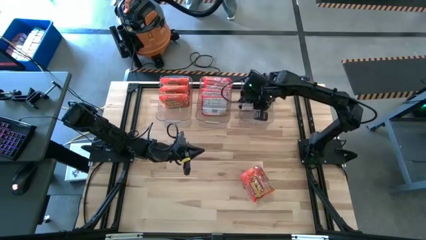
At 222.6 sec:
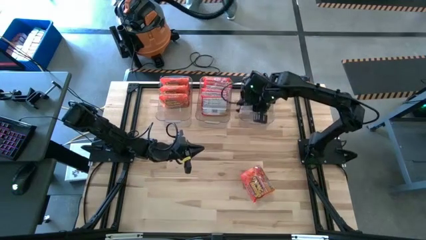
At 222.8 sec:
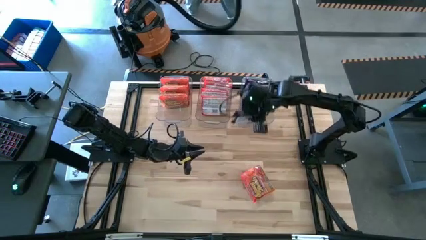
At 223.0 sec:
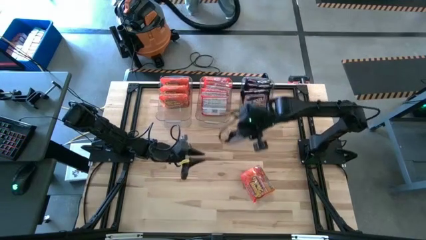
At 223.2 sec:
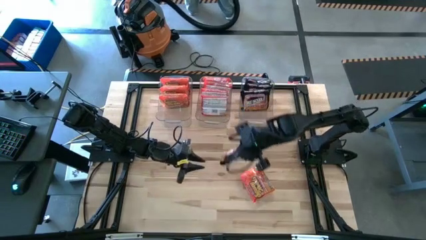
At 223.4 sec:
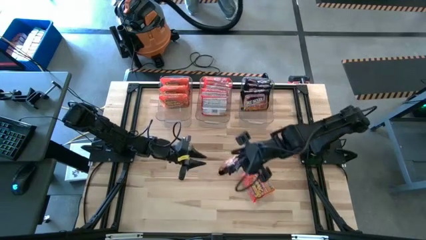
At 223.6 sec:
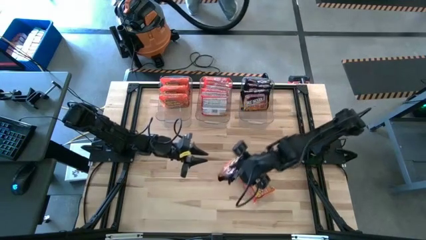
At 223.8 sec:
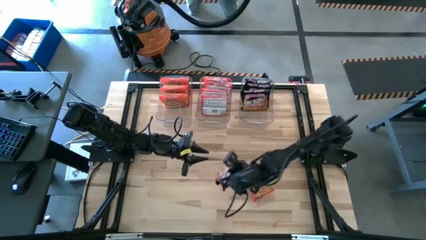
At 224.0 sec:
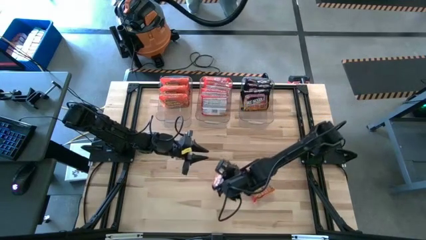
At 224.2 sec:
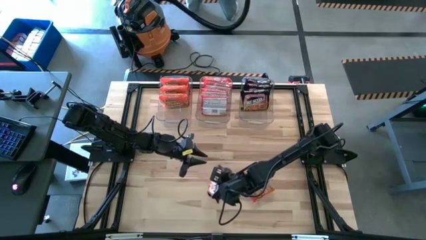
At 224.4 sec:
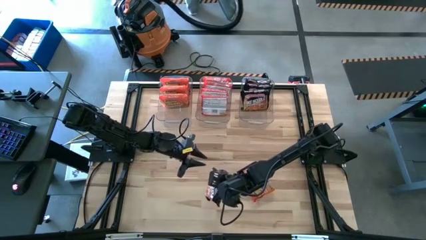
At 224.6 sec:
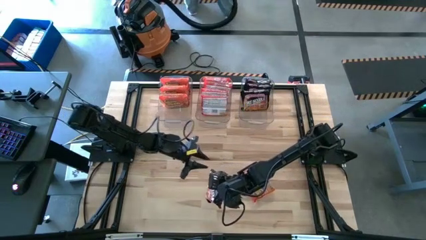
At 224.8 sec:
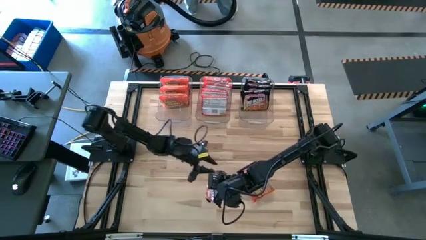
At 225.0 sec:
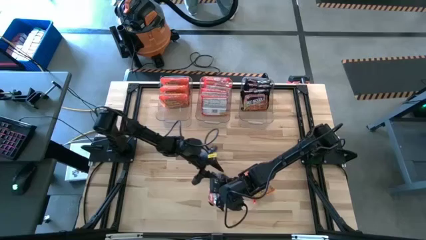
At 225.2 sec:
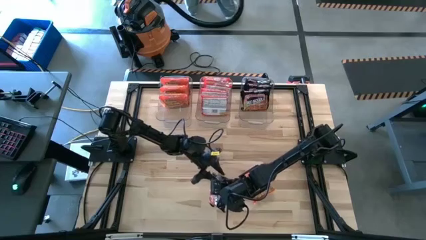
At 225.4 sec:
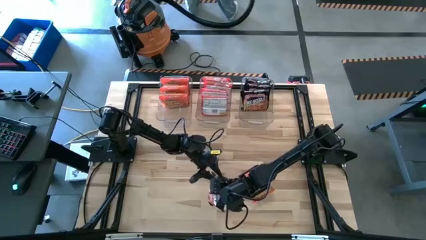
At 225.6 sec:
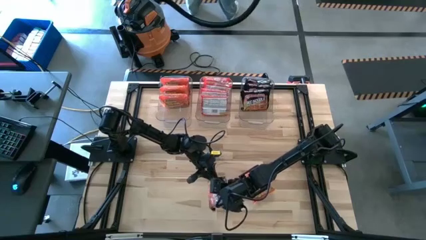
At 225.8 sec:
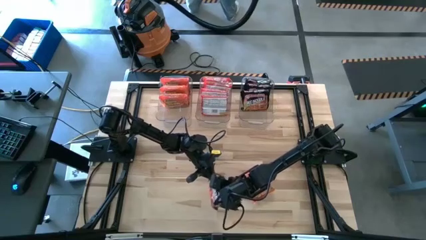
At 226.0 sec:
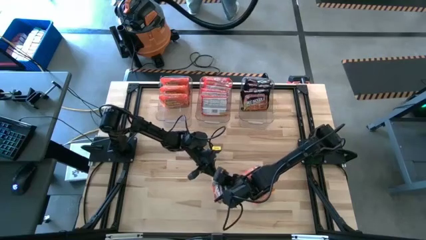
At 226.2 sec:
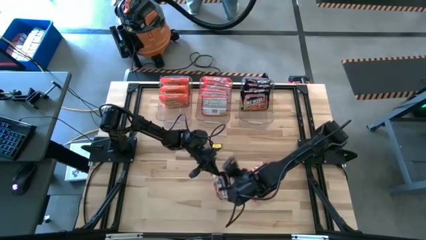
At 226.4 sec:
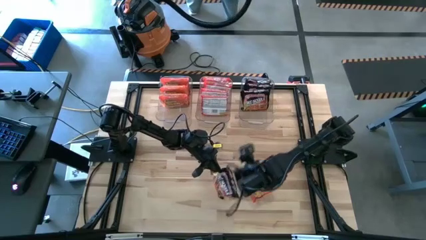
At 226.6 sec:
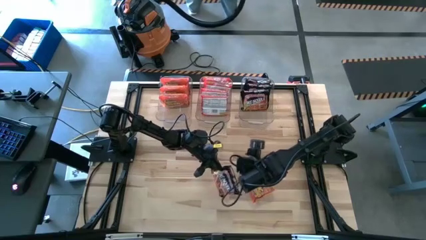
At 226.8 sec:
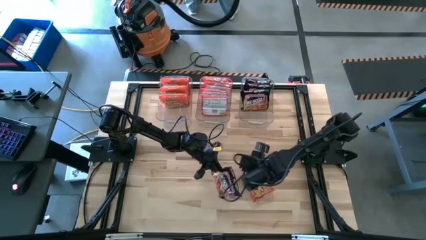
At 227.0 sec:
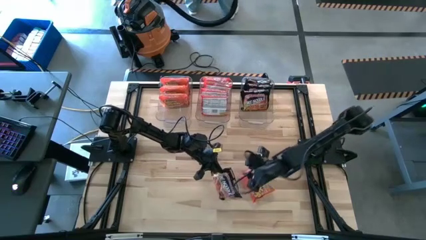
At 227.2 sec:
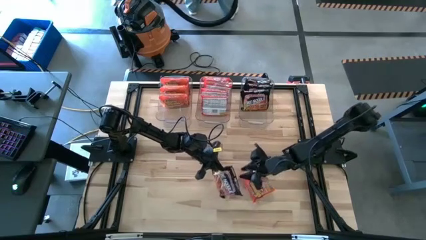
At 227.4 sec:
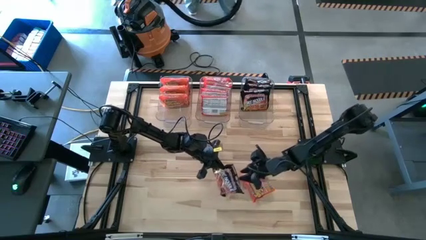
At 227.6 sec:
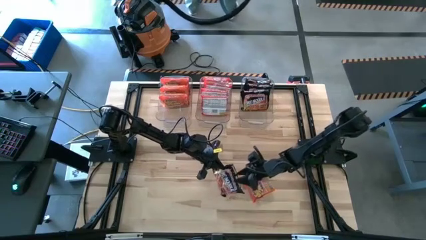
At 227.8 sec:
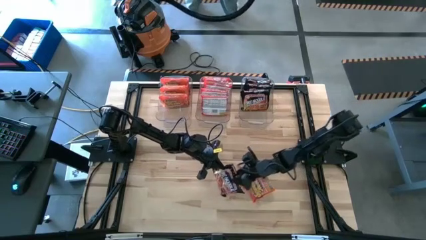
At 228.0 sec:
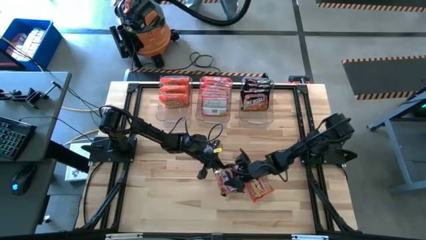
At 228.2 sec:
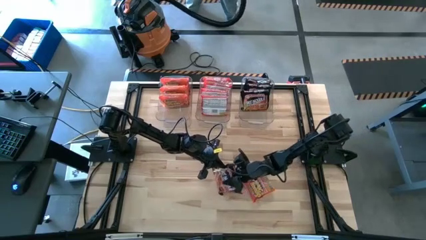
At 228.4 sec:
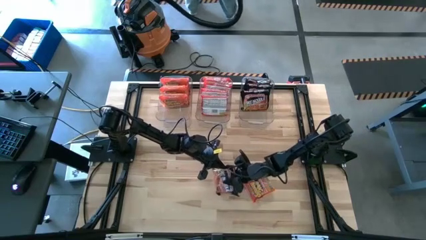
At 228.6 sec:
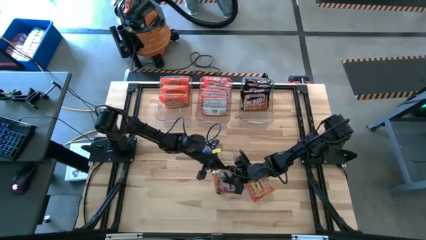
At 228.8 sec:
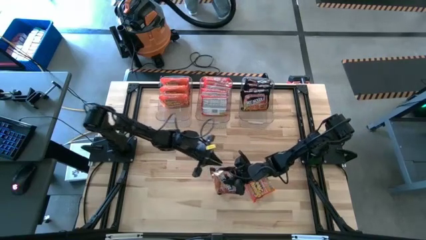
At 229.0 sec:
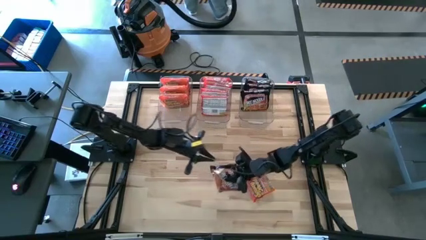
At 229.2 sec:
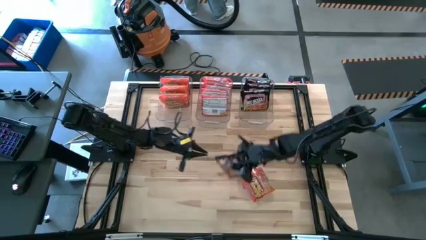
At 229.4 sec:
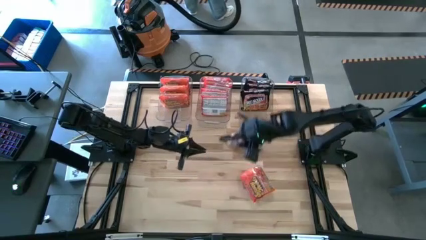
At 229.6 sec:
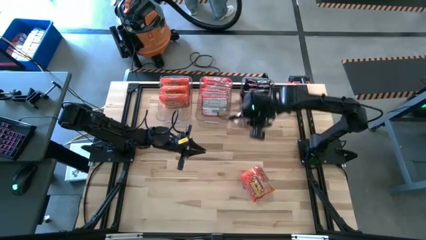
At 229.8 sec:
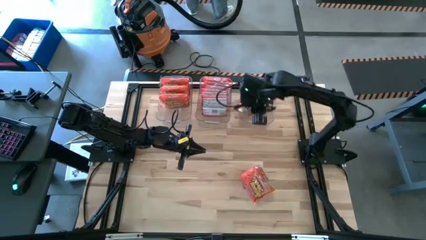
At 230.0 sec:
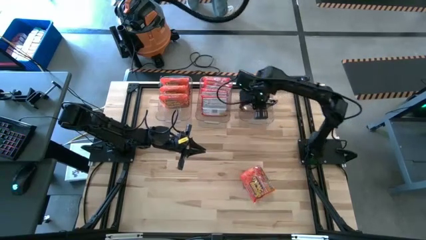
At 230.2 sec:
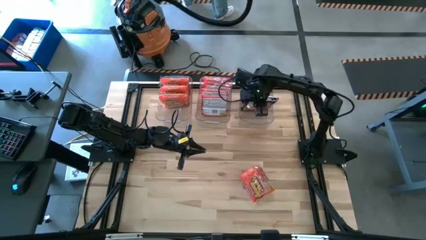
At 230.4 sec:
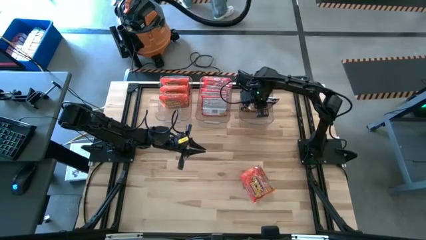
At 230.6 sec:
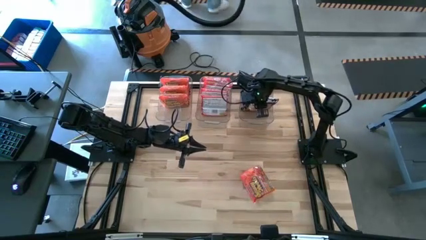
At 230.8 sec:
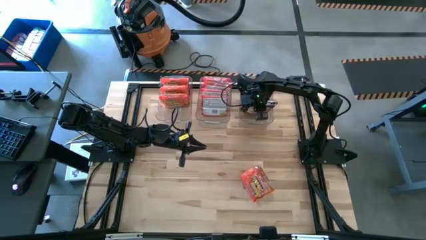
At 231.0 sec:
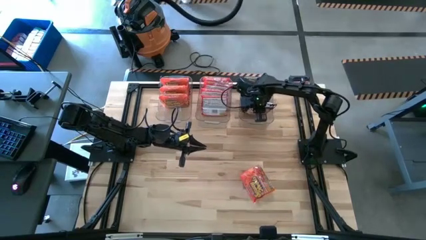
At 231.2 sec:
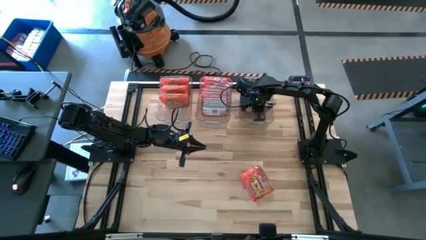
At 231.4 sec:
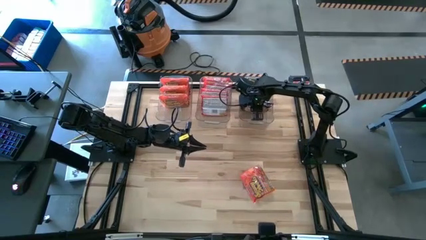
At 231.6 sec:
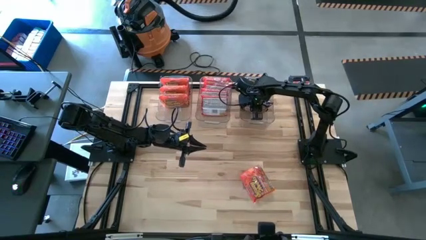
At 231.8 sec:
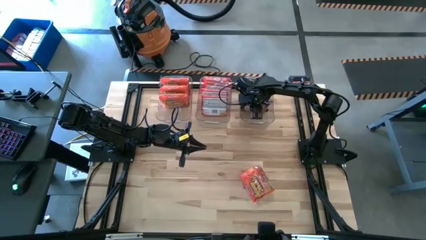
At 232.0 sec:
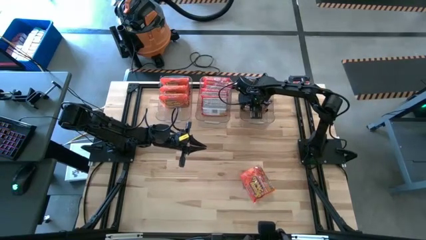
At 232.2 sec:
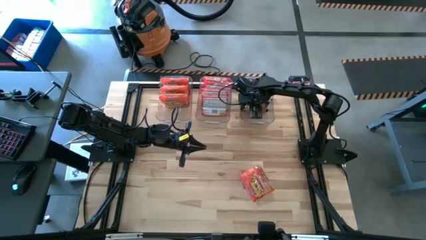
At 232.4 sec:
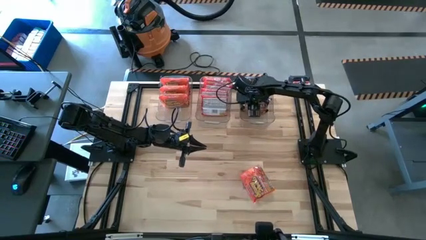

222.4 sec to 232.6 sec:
Task: Sort Maruchan noodles
Put the black noodle pack into the right transparent bin

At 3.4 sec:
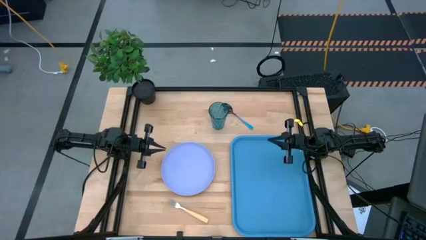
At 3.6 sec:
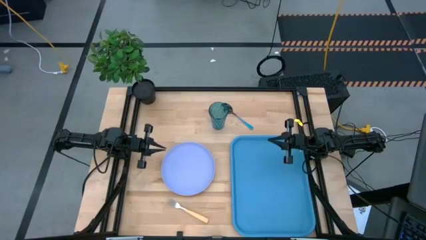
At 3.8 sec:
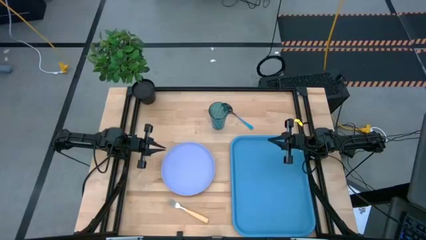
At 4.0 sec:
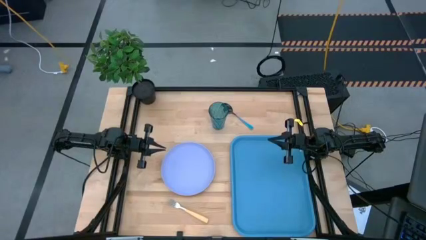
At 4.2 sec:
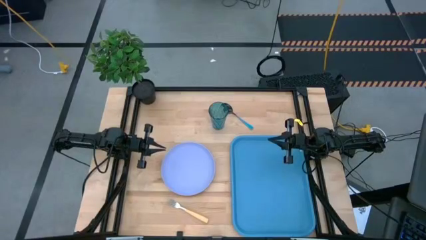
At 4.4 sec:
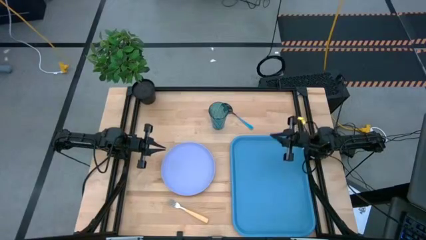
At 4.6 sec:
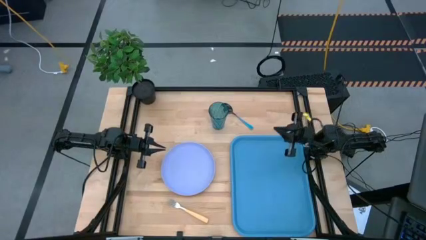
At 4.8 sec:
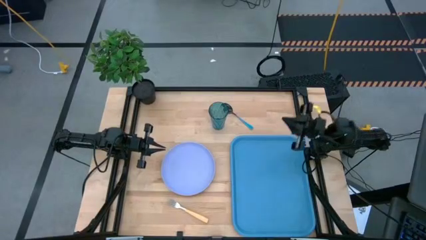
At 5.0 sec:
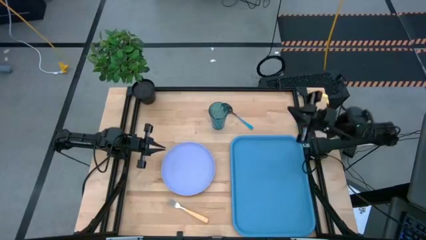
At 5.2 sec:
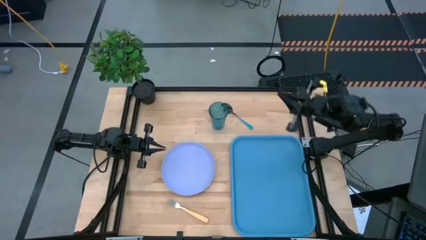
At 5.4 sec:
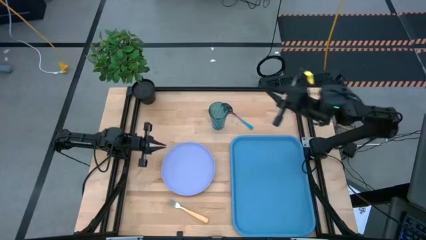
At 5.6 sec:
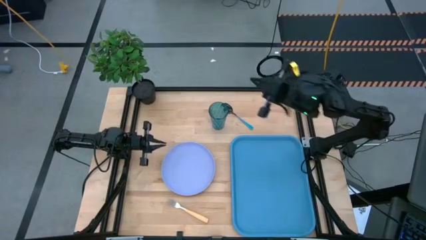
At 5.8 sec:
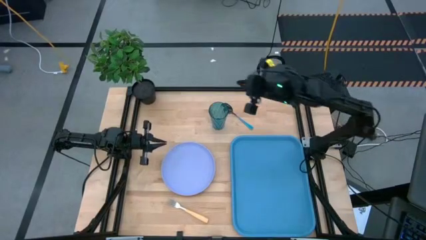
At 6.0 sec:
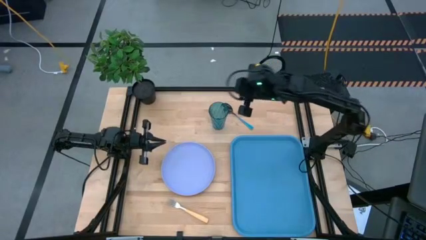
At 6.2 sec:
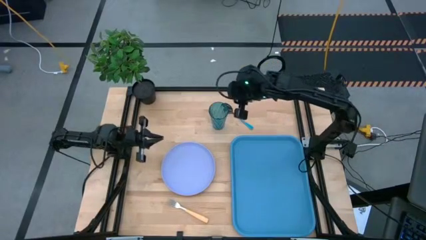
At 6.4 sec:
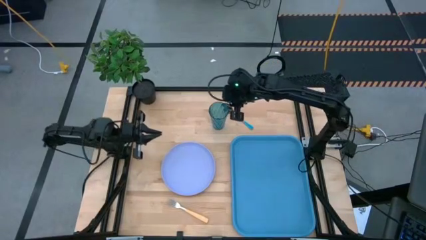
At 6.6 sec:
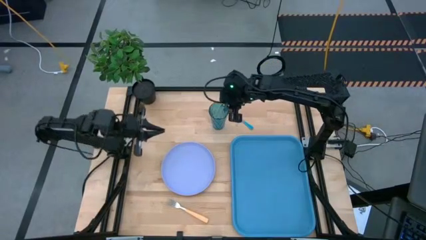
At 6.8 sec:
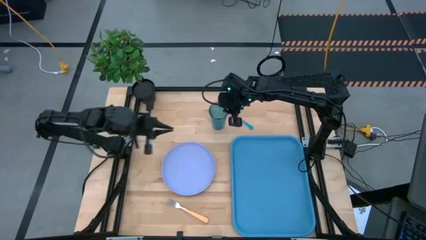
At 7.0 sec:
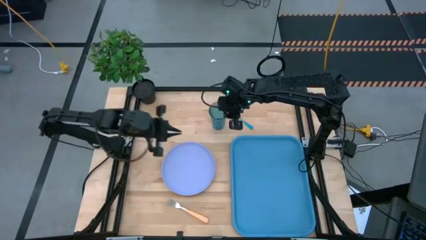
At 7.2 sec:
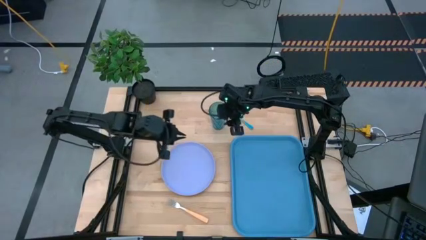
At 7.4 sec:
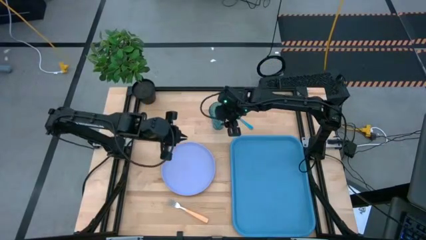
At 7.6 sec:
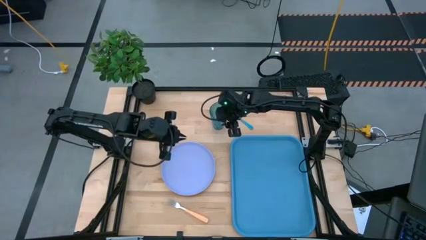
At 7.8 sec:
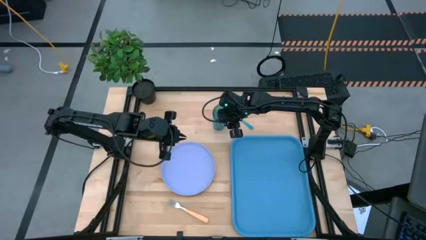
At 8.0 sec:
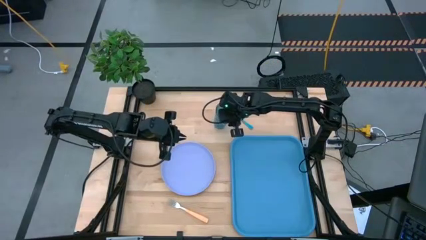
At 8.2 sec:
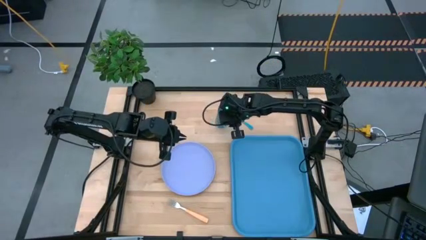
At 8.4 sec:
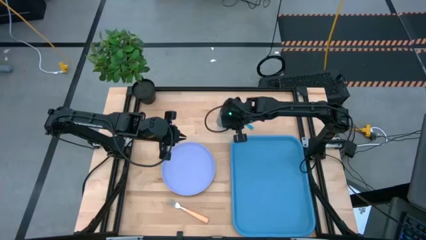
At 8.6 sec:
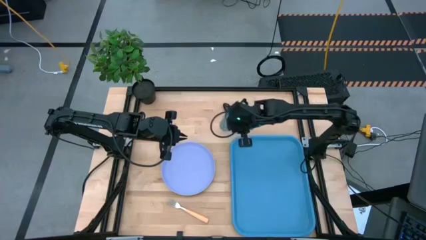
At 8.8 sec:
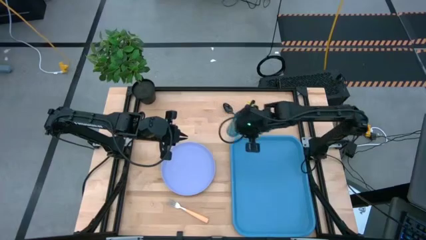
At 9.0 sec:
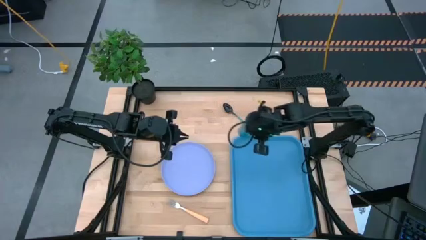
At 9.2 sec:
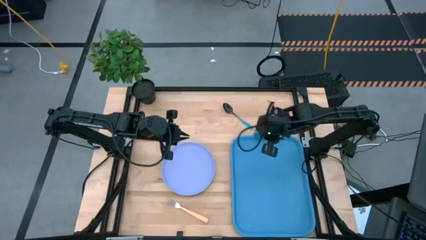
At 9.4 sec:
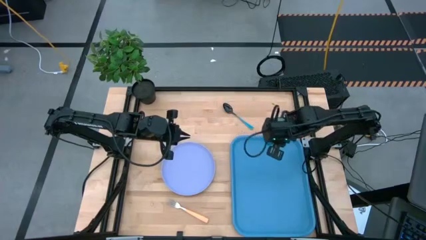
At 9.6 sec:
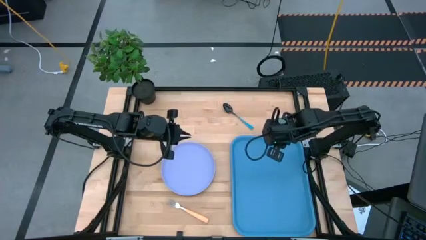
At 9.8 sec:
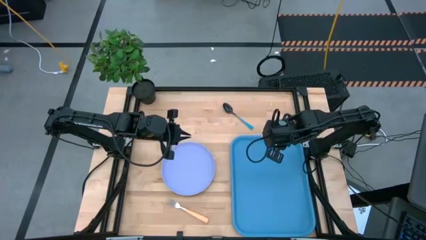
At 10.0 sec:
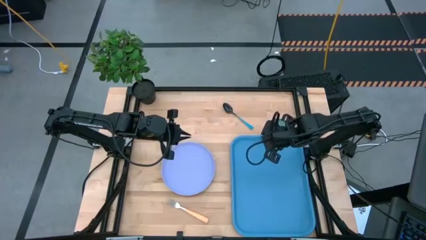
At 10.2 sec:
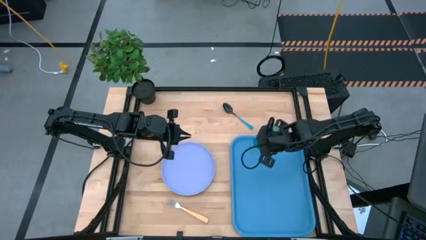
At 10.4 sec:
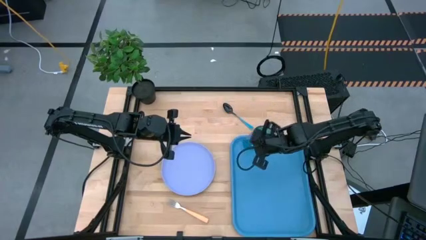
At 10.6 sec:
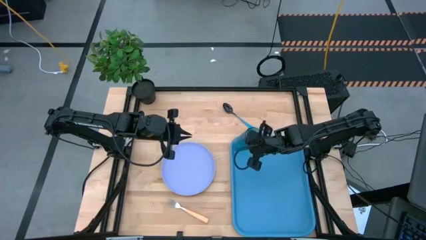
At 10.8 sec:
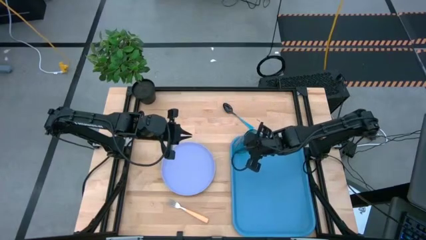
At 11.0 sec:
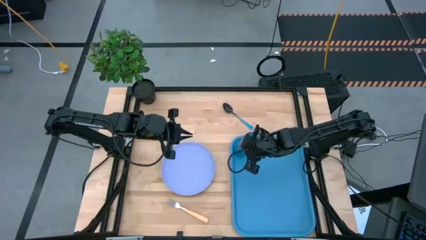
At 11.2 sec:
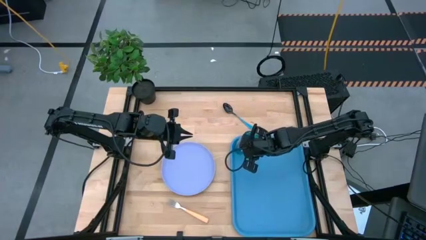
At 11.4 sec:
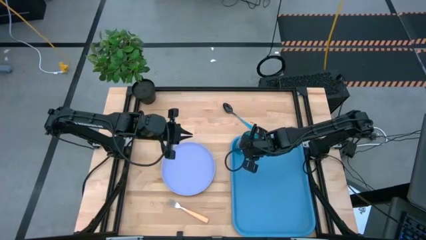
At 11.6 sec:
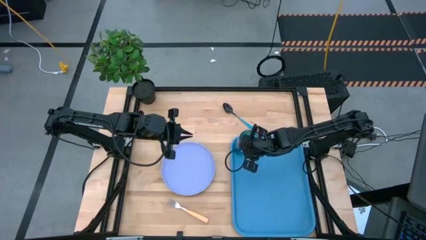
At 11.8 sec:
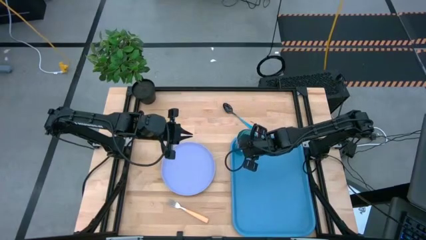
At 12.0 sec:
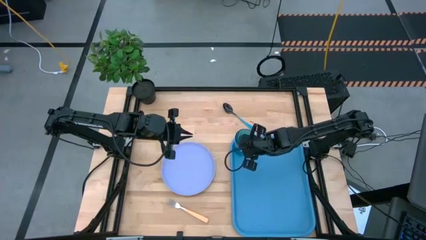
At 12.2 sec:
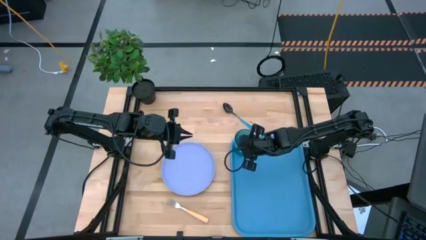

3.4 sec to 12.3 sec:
Task: Pick and place plate/cup/fork/spoon on tray
Put the blue cup on the top right corner of the blue tray
